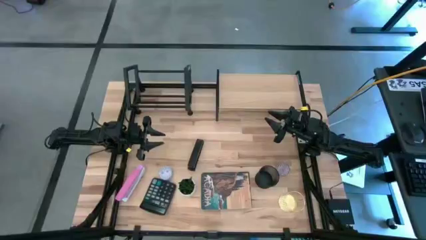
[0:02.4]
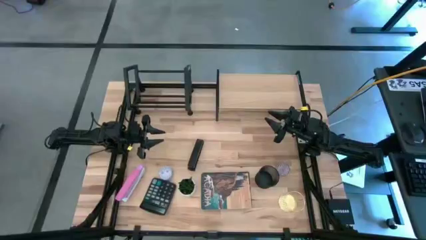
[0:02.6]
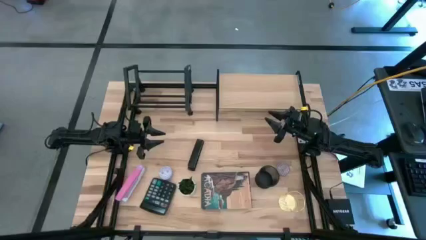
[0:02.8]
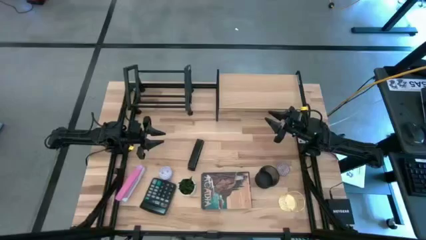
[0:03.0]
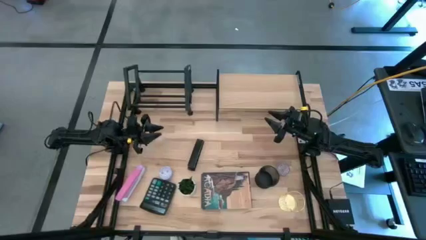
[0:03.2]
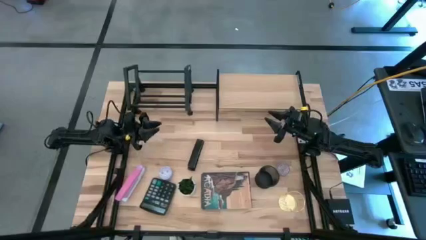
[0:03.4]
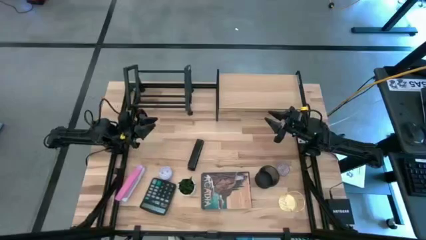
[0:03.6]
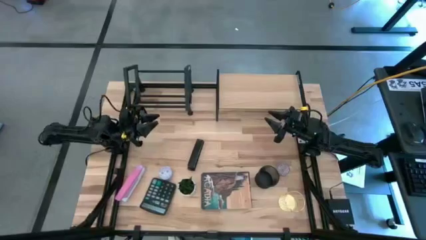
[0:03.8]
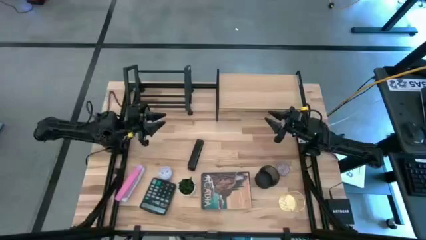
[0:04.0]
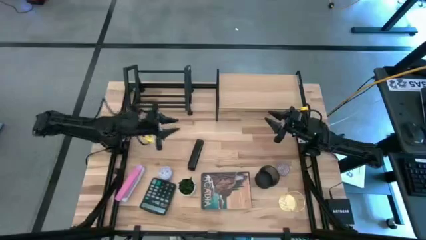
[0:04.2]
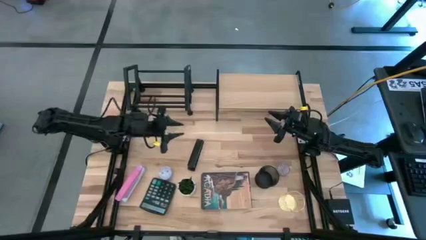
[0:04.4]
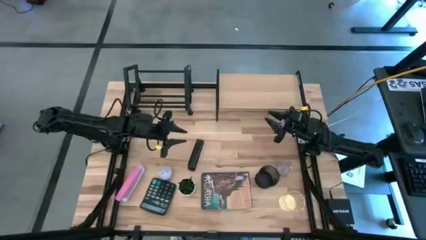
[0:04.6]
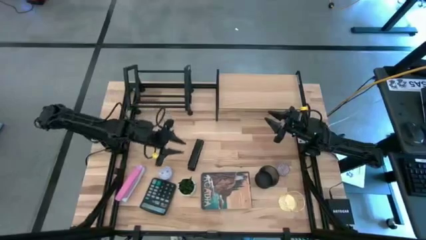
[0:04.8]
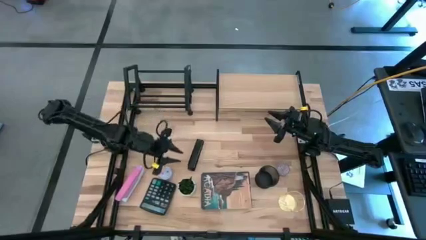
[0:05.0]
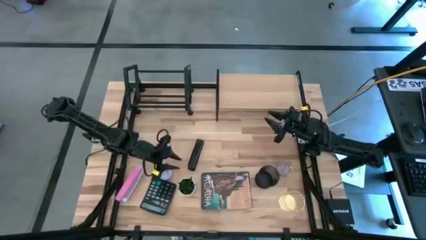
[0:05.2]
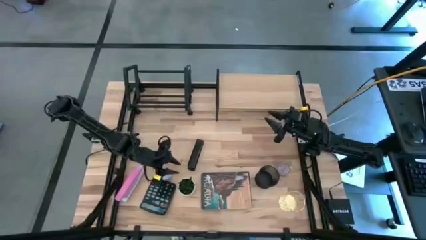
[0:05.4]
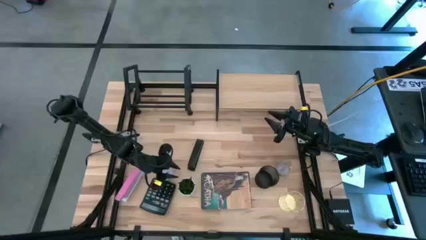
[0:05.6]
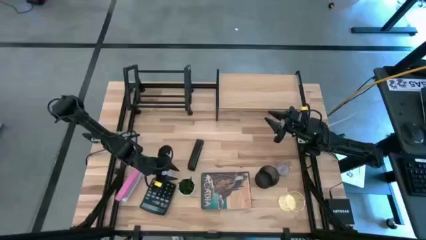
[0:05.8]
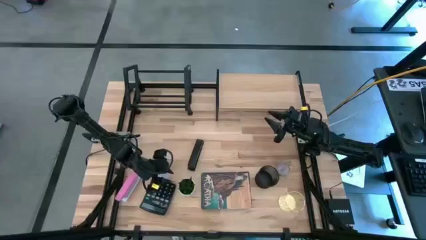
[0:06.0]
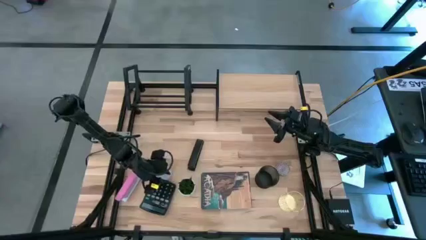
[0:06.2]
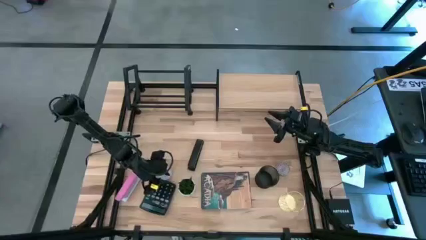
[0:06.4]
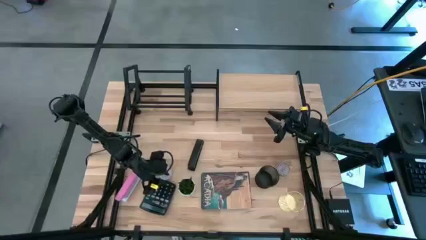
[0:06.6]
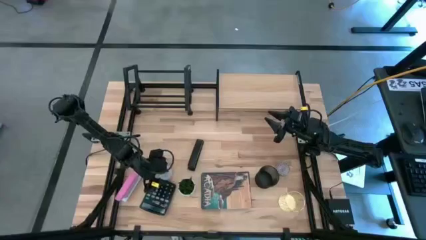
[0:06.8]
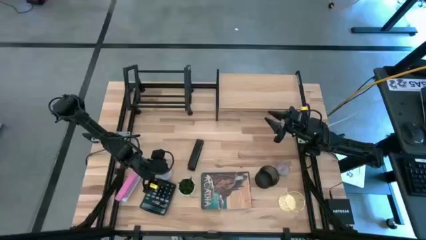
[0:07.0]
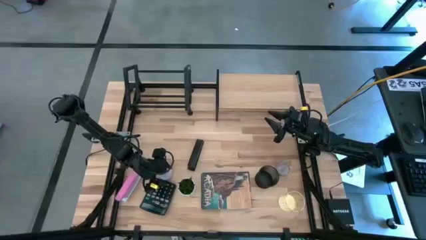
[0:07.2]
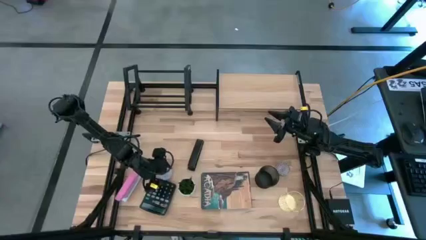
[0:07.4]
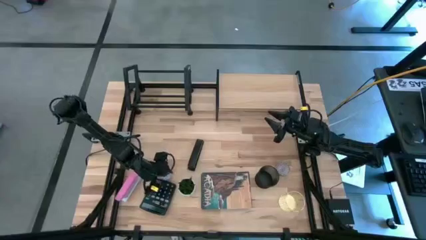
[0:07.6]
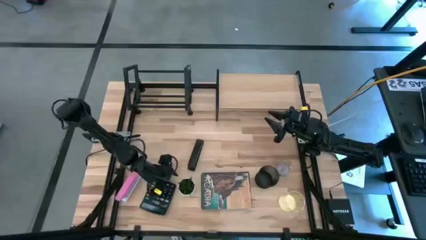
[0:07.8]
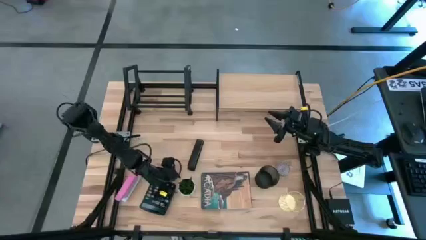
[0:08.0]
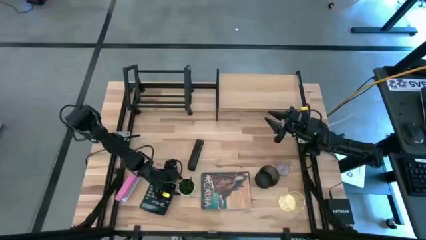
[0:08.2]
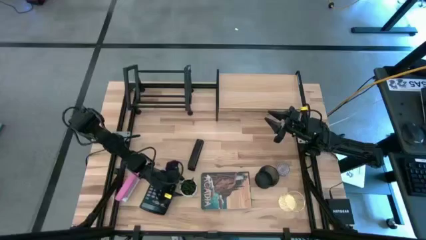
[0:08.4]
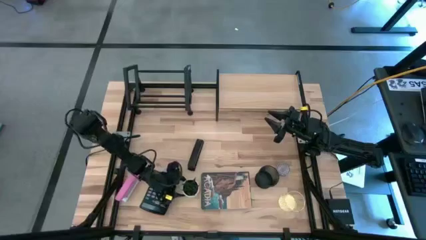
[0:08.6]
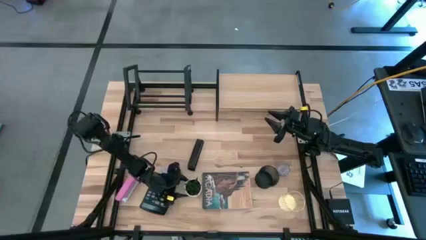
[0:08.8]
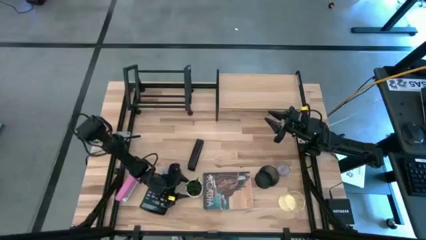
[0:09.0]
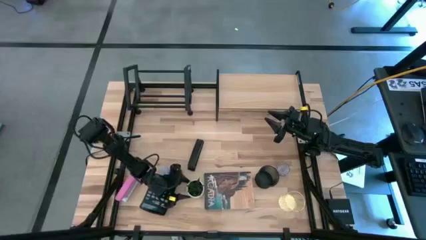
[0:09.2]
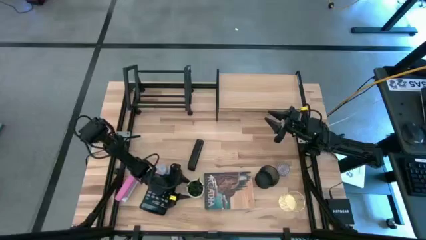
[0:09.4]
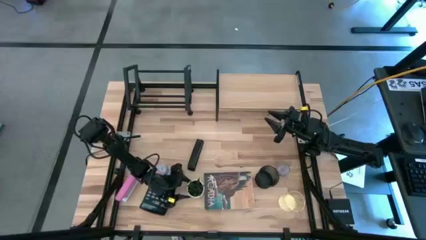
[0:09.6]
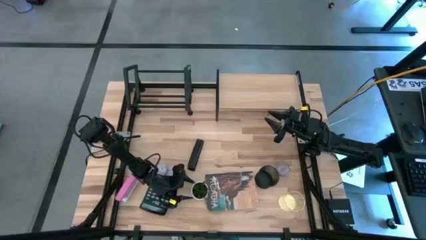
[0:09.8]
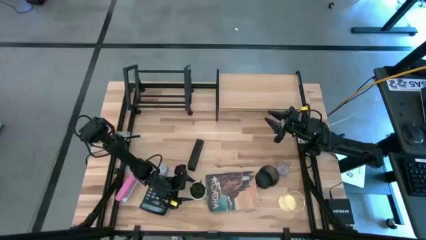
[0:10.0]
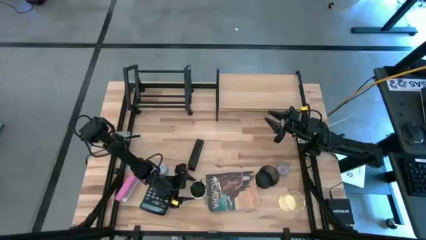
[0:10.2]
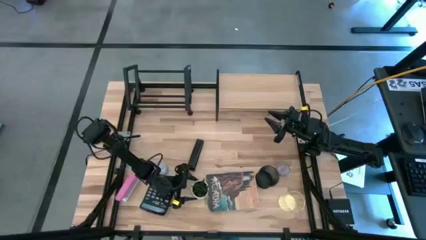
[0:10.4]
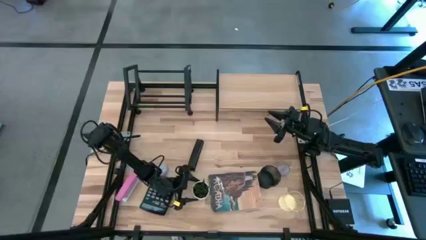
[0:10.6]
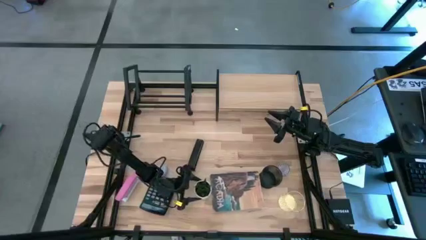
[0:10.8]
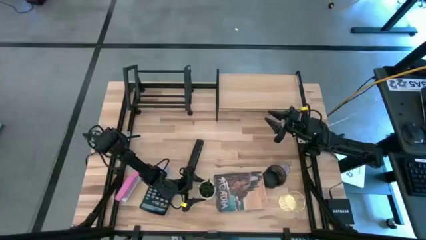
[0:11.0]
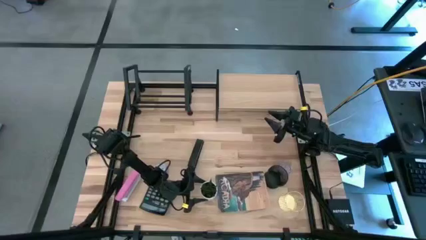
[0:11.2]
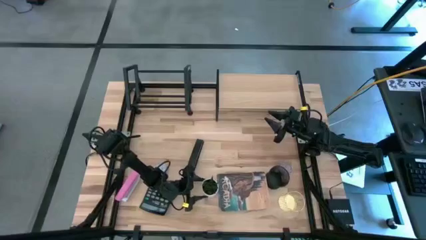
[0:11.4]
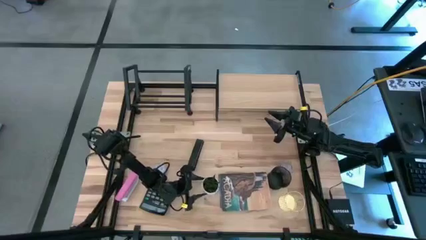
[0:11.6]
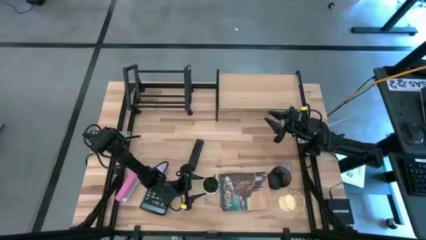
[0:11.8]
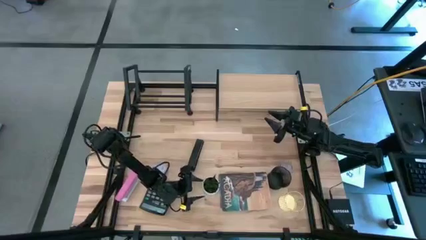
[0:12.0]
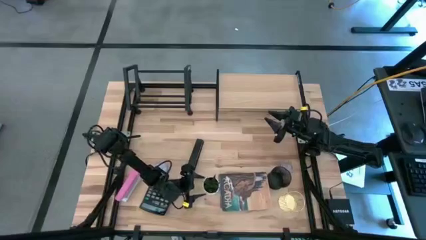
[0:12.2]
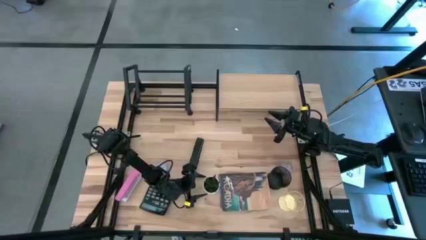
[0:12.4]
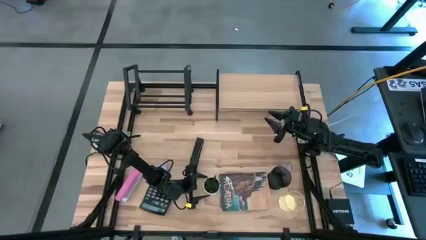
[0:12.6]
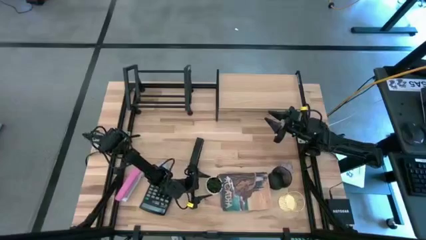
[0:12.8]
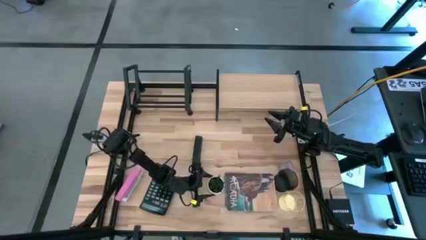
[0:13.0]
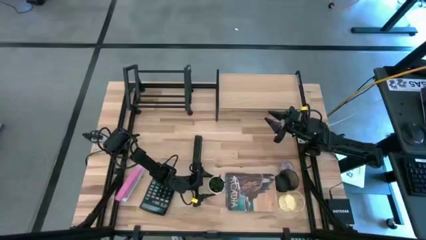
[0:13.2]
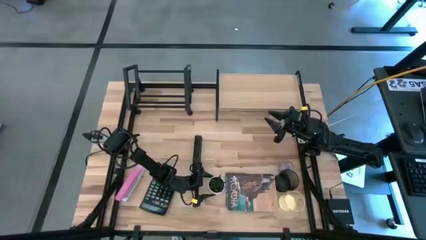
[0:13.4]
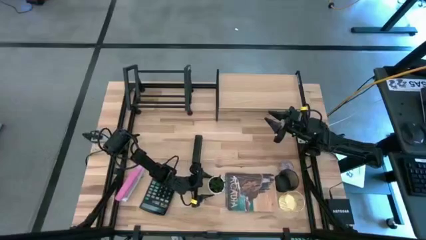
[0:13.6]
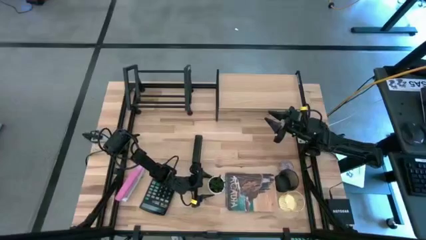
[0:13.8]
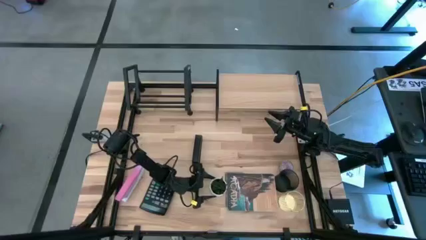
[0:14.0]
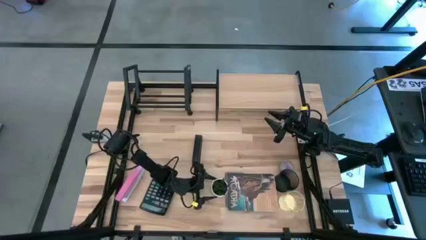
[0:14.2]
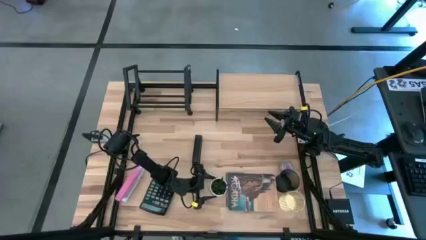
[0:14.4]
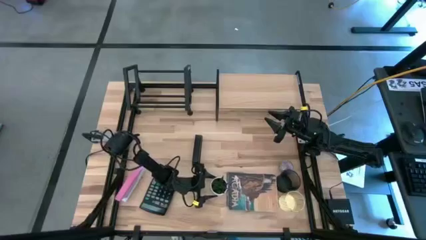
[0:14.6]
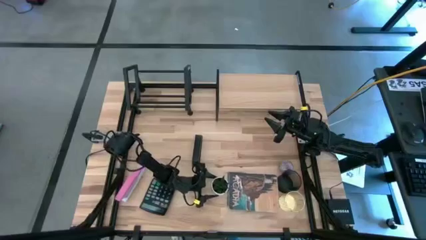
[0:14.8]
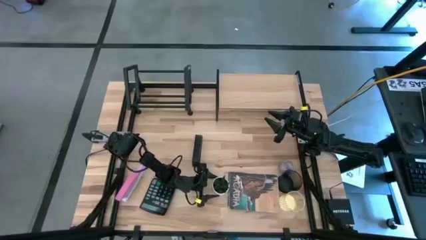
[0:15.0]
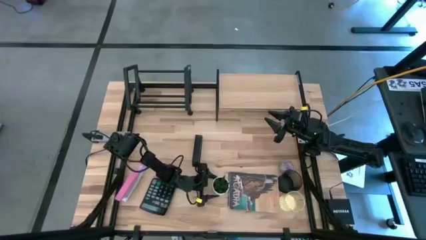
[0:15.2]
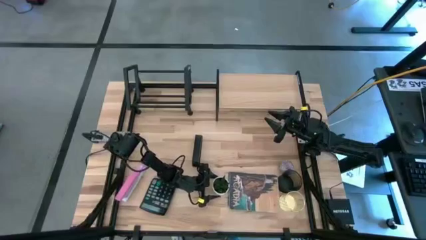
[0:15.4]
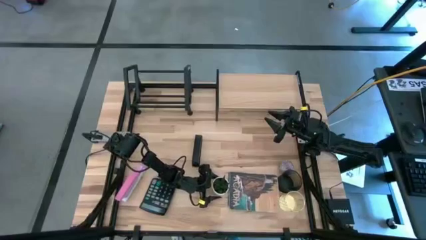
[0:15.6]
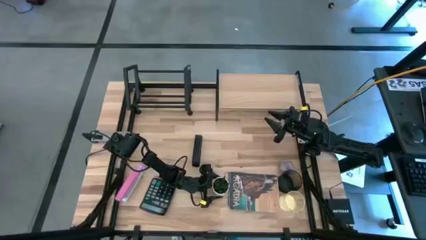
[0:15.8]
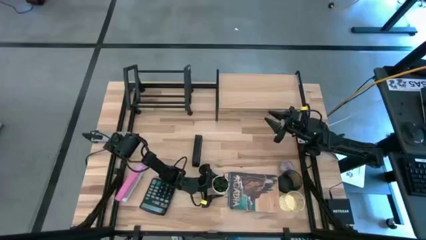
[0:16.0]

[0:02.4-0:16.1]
Task: Stock shelves
Put the potted plant onto the shelf

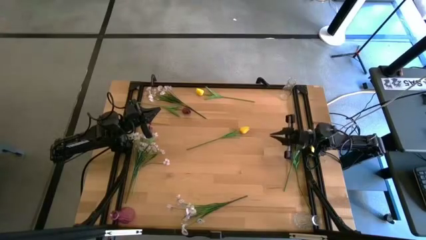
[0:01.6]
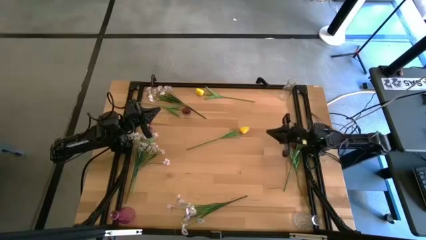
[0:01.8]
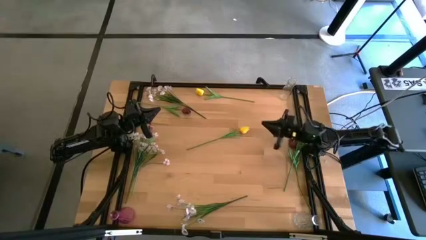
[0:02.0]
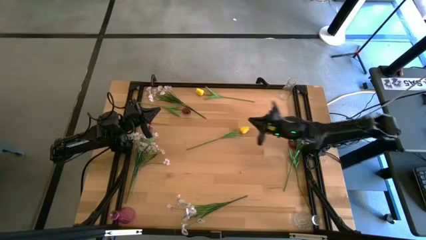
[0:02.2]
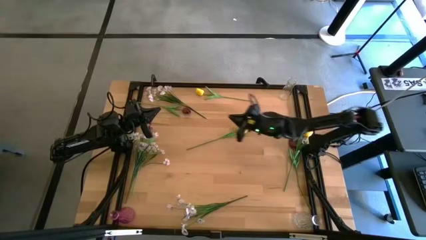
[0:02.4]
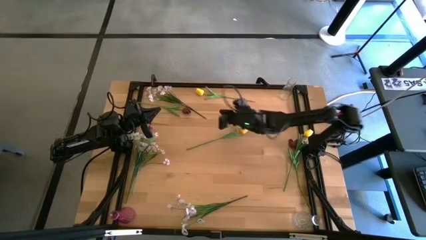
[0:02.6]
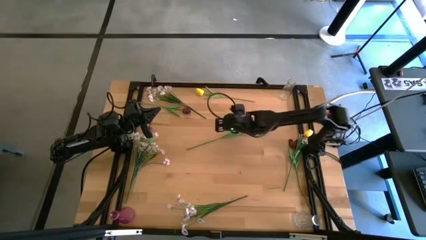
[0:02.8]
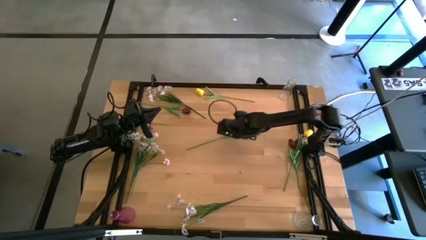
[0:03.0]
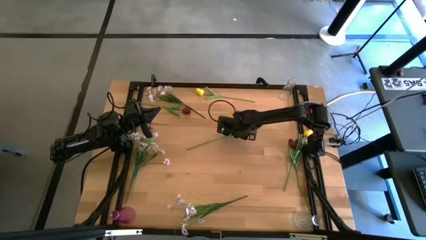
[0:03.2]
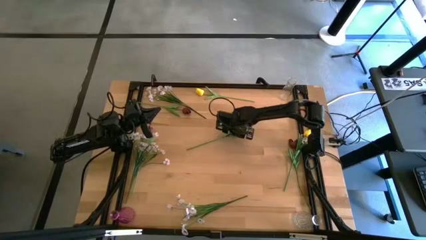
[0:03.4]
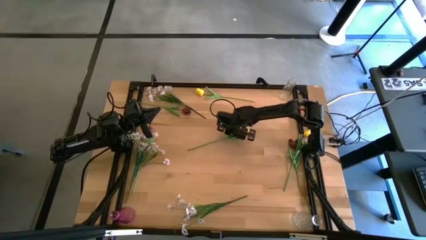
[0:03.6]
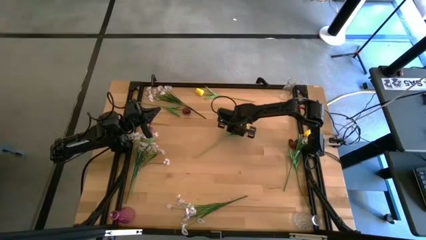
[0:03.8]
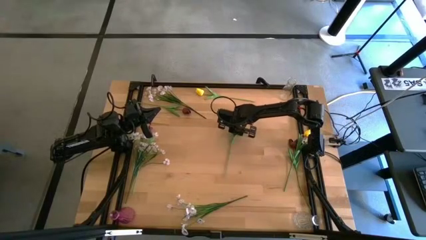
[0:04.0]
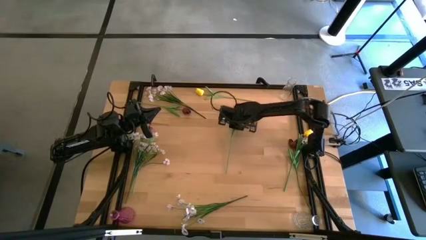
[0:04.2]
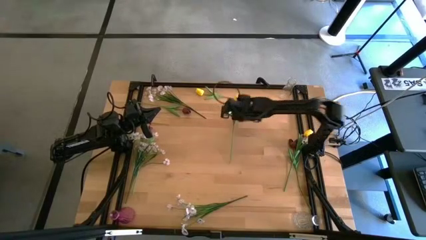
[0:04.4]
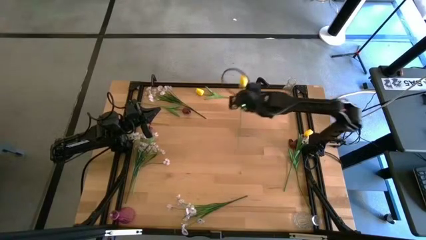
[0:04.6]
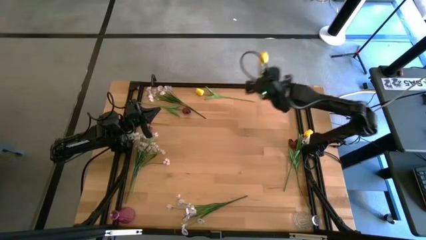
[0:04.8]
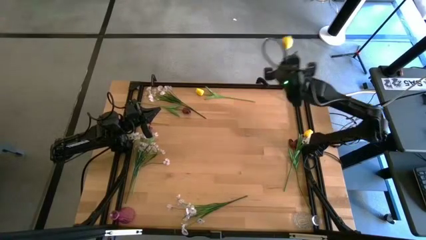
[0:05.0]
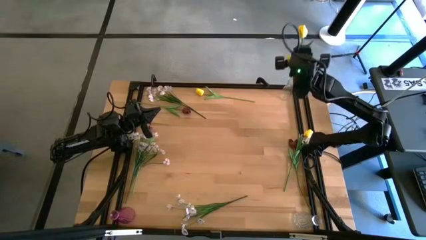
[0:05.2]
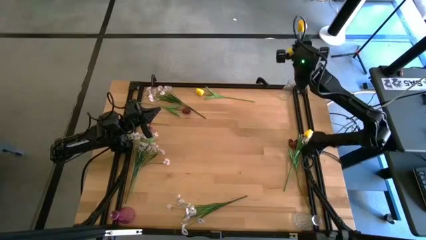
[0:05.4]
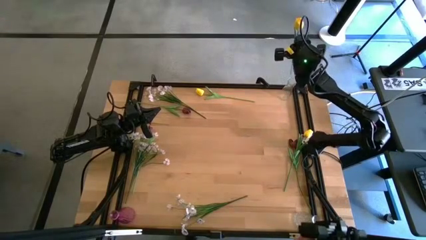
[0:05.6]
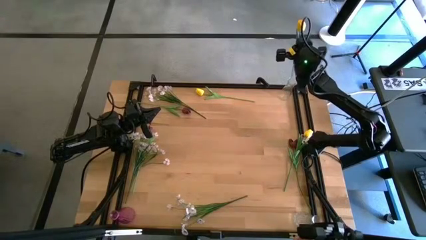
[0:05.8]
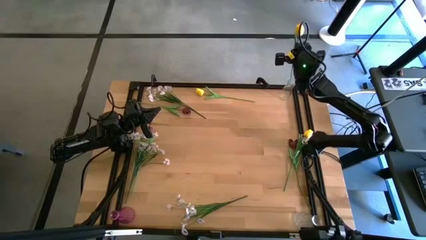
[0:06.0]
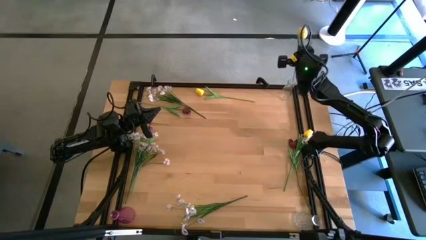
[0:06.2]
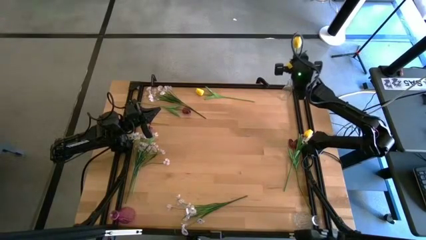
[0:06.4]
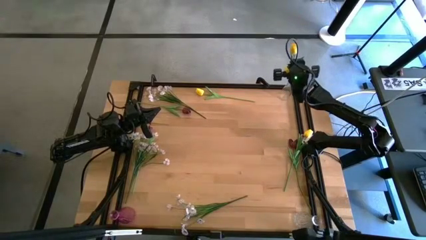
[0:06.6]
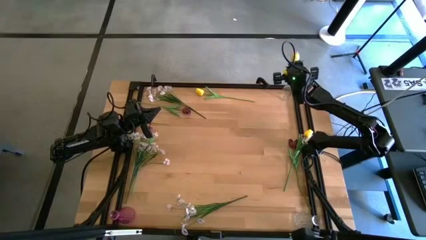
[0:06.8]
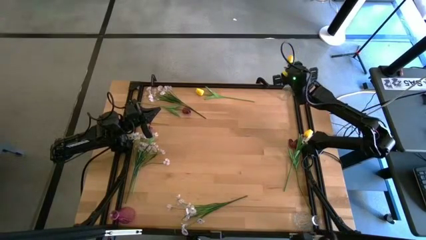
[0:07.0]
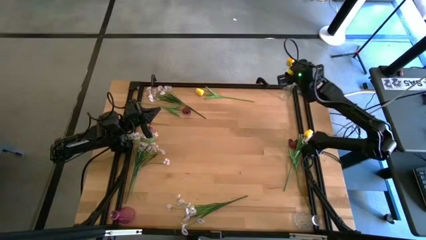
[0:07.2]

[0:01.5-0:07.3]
Task: Sort flowers into vase by color
Put the center yellow tulip into the glass vase
